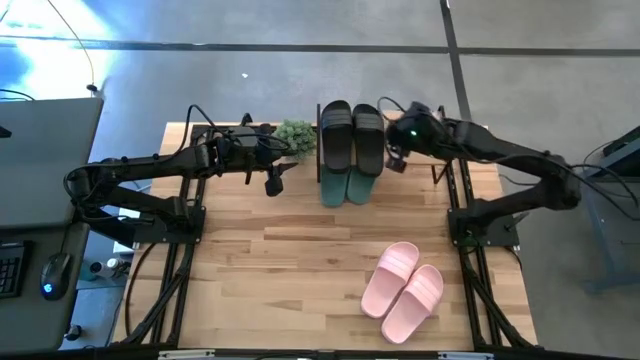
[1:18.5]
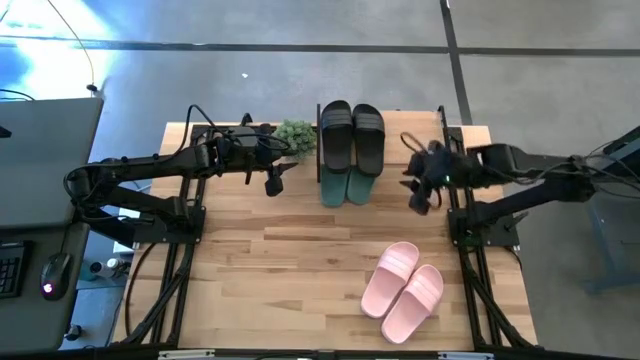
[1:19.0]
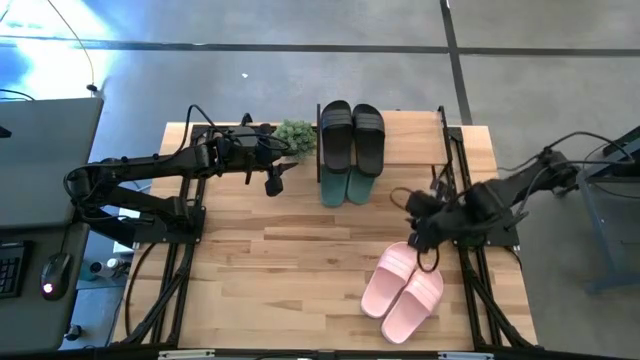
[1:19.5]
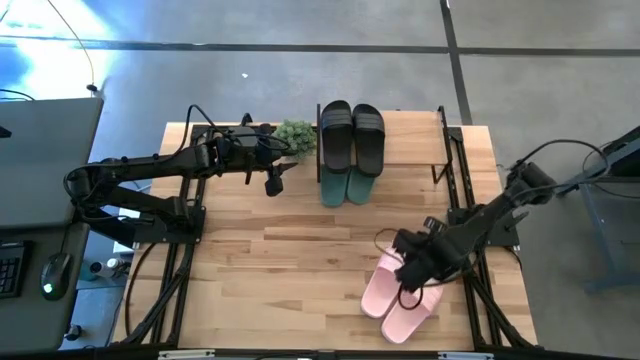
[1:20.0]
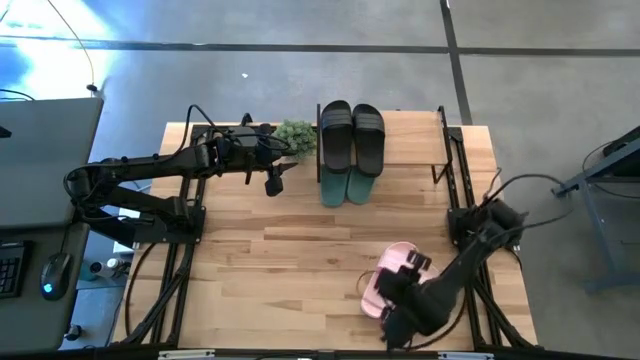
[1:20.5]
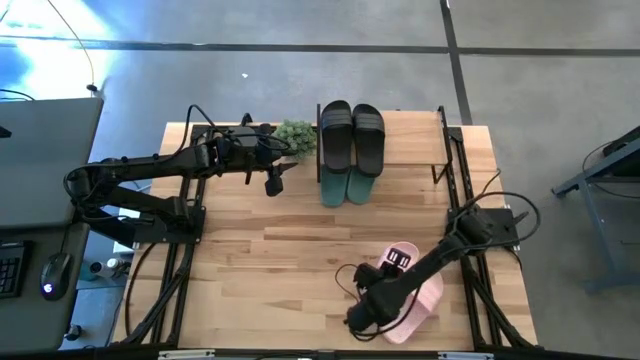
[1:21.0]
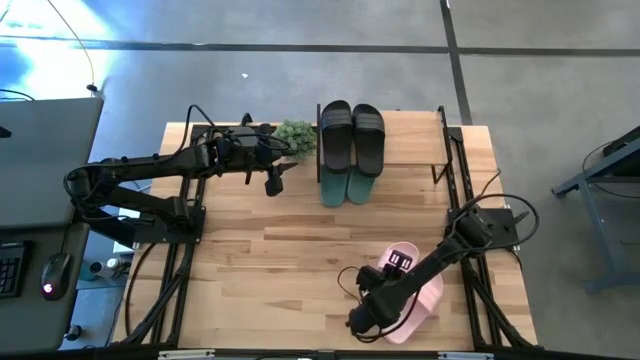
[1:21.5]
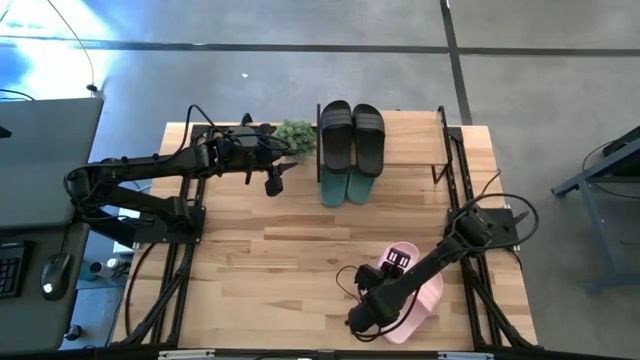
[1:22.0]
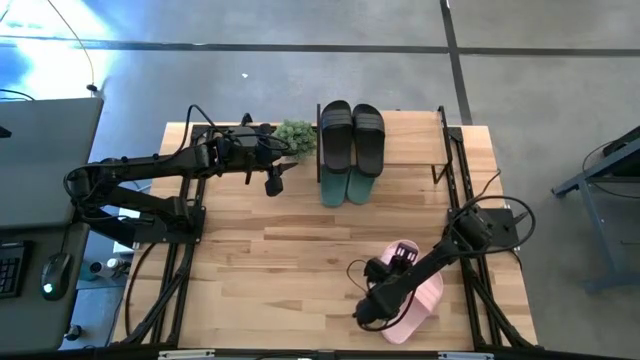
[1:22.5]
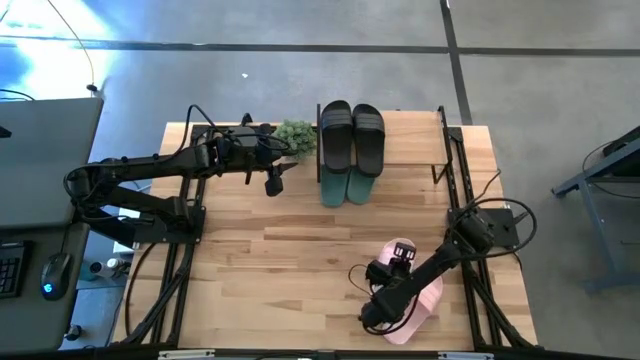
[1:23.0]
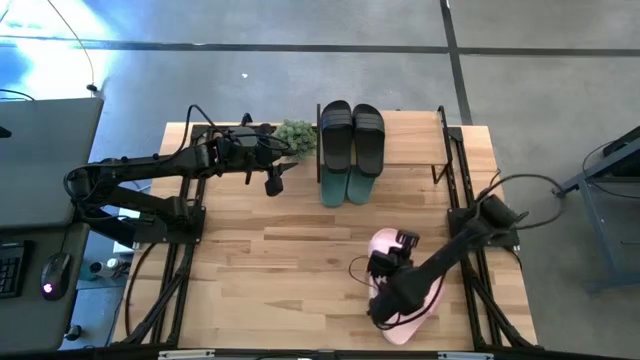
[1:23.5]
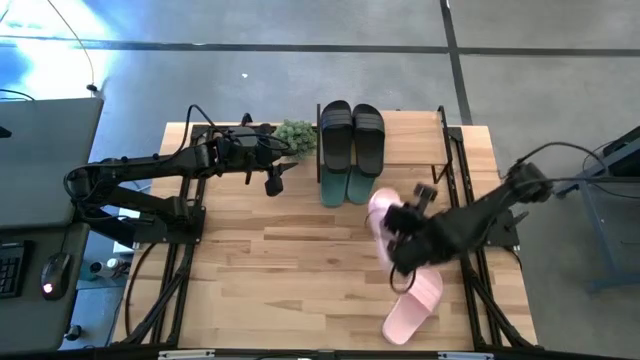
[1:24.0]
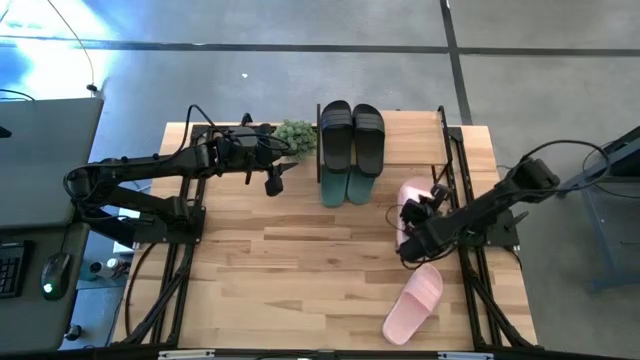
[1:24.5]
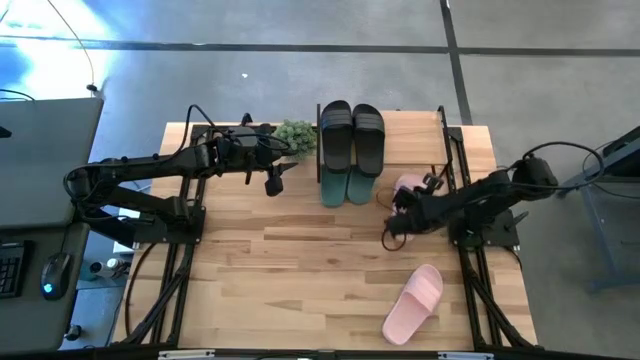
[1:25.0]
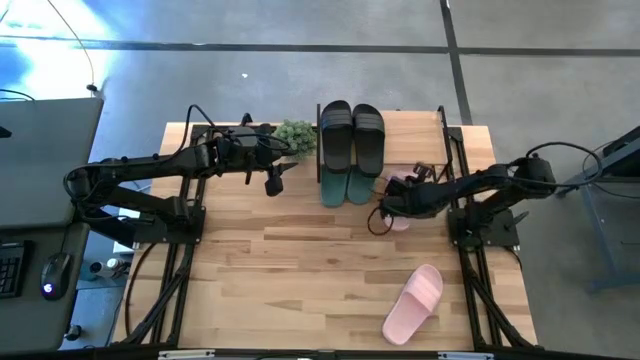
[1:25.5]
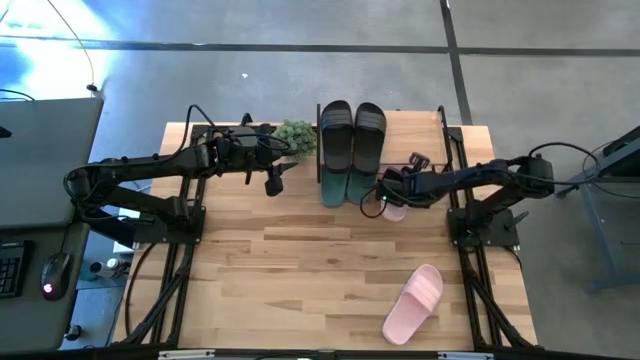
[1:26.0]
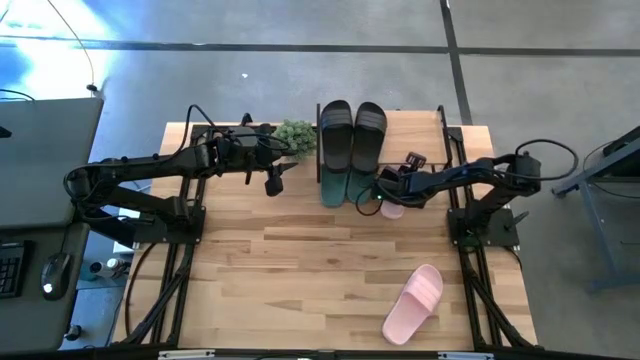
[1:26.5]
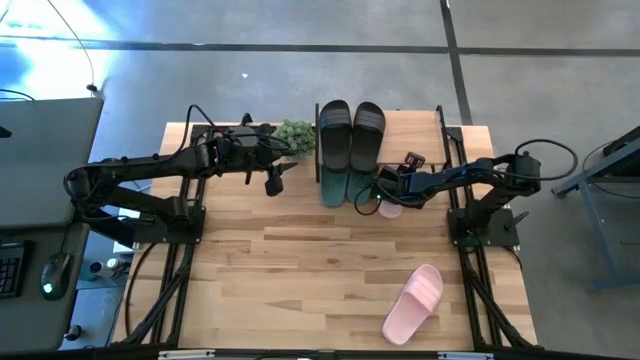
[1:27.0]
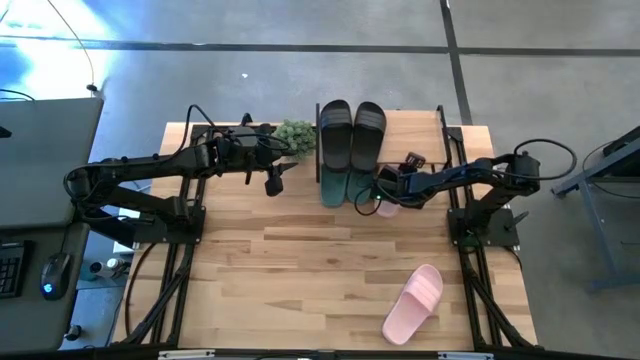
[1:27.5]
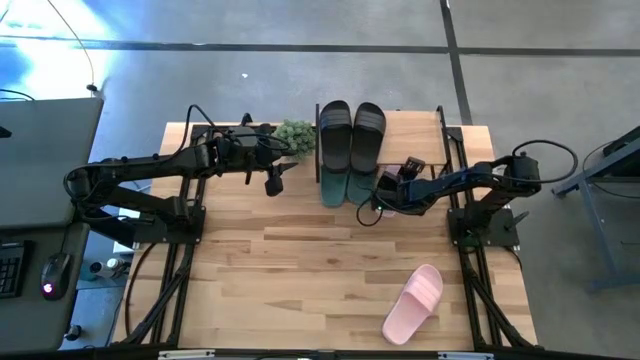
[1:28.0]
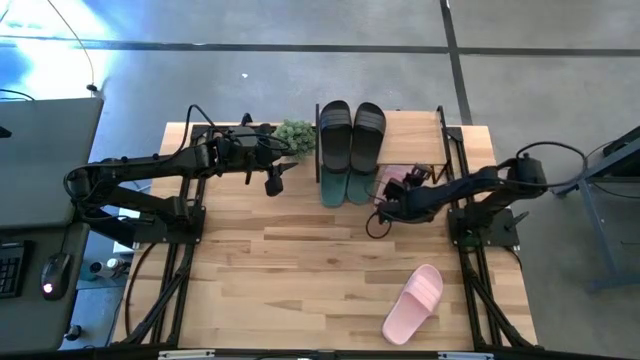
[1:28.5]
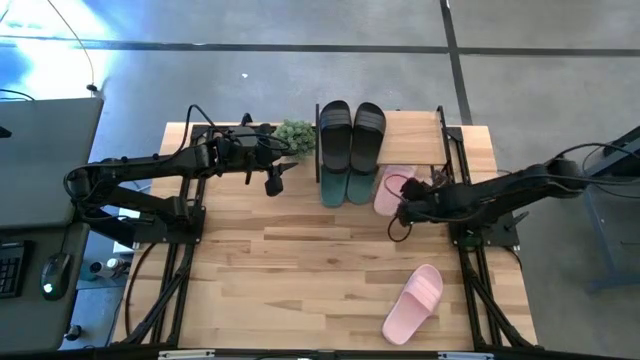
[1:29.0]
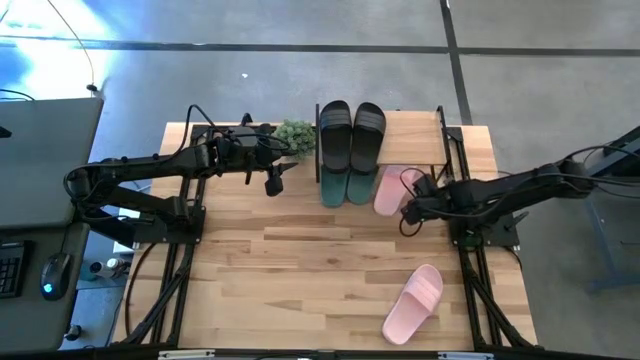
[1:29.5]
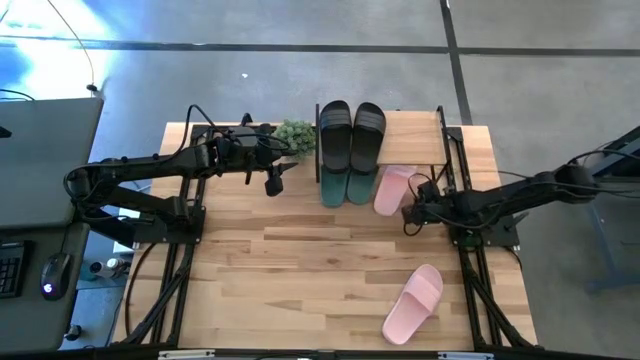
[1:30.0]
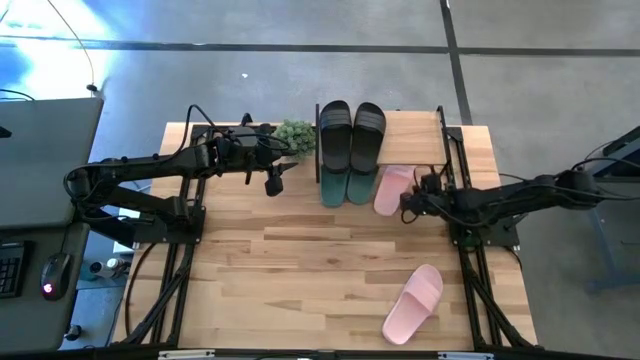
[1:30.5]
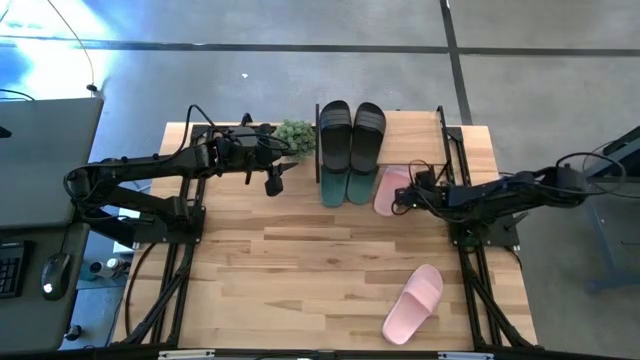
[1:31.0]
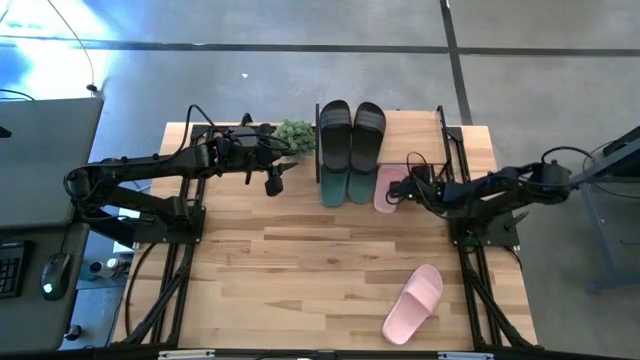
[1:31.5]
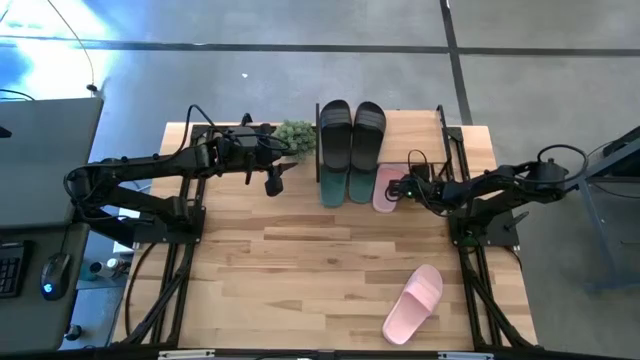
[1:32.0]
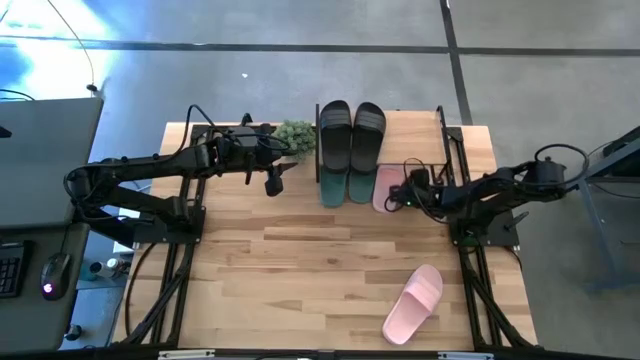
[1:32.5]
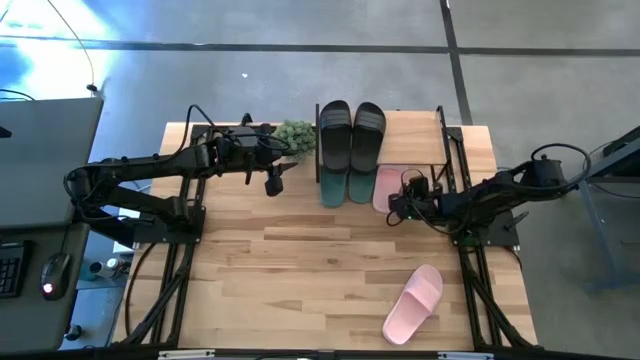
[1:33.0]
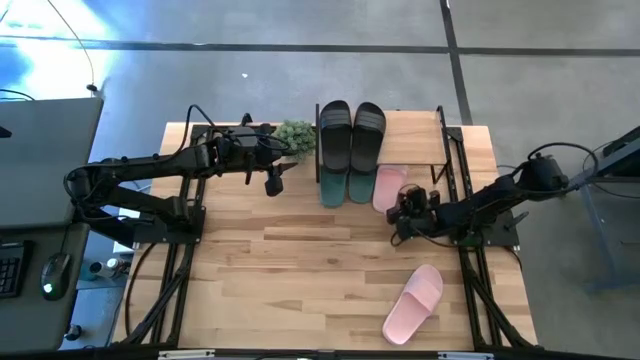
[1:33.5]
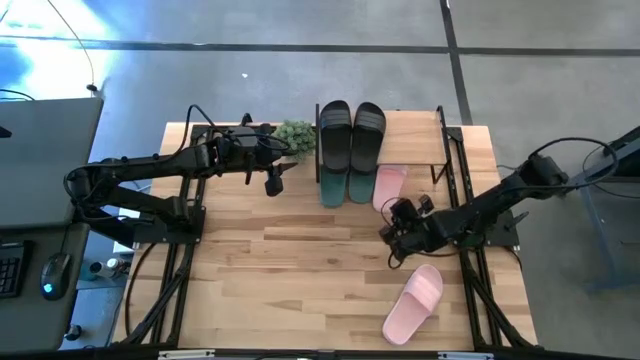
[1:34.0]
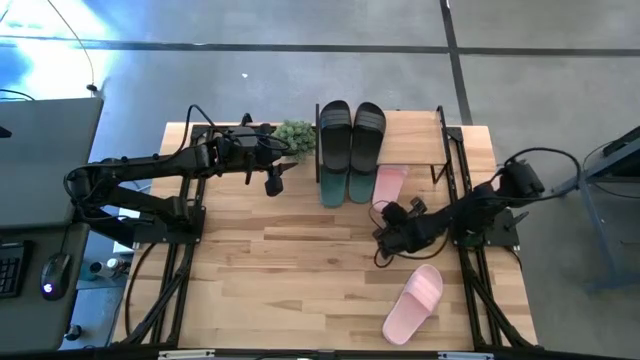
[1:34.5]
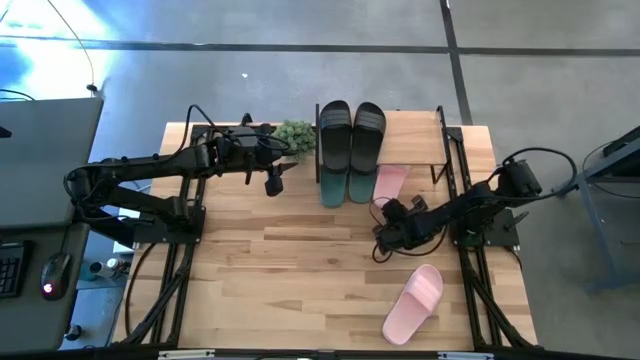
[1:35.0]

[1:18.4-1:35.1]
Task: Pick and place slides into the shelf
Put the left pink slide under the shelf

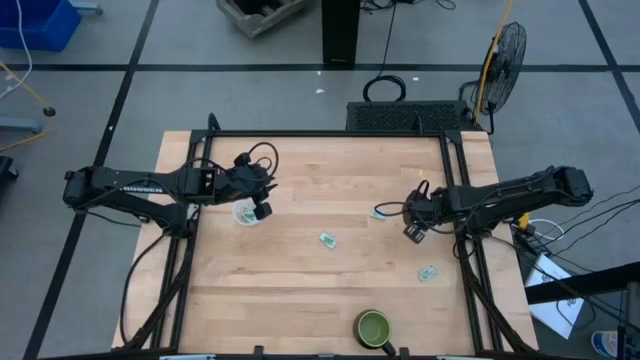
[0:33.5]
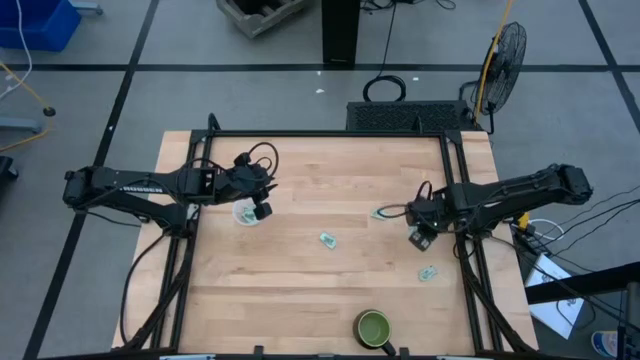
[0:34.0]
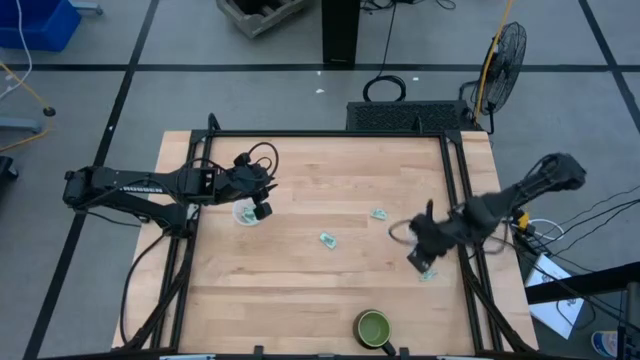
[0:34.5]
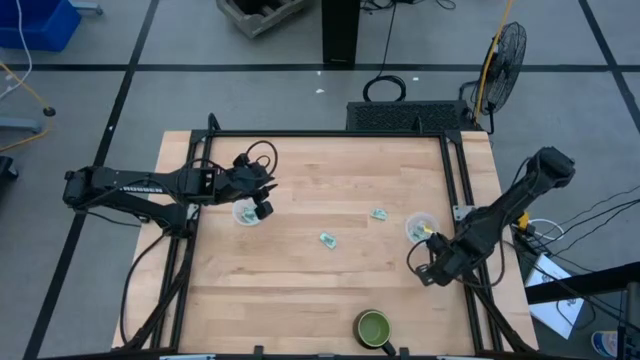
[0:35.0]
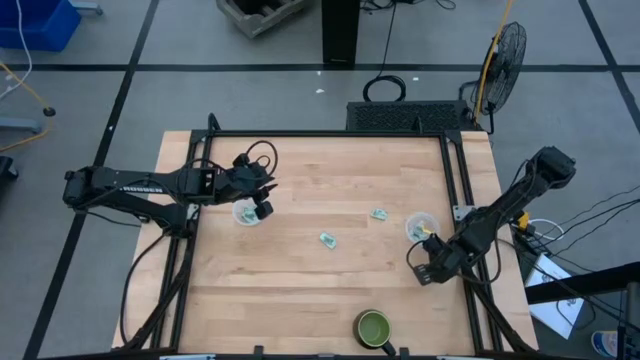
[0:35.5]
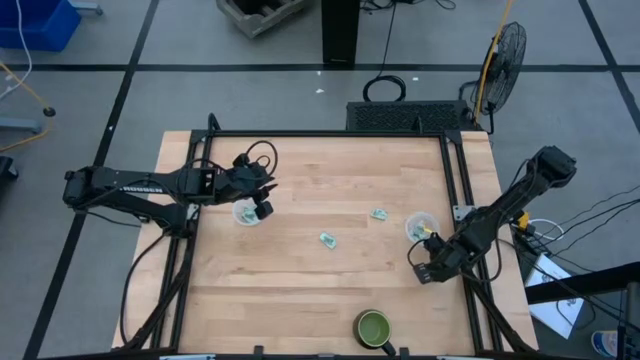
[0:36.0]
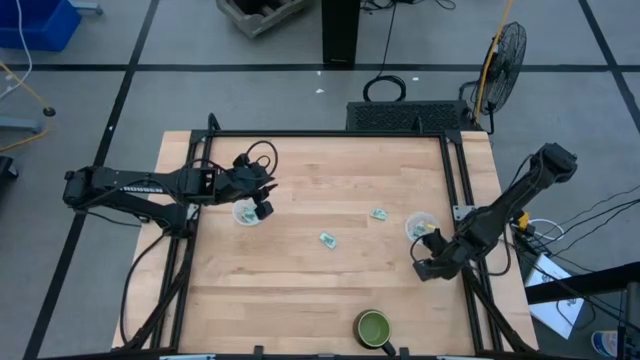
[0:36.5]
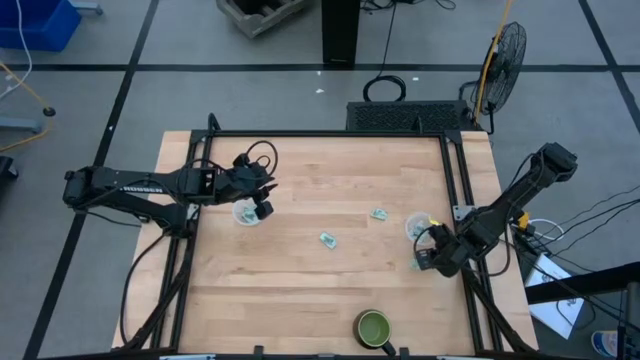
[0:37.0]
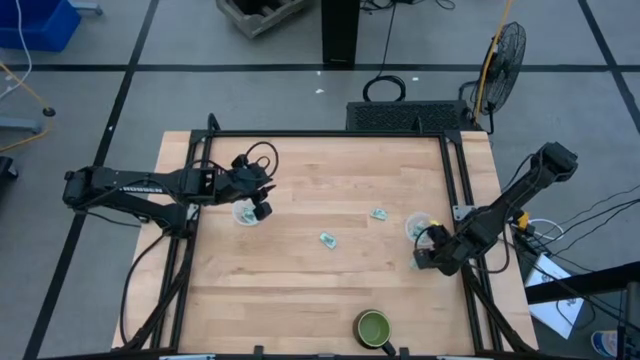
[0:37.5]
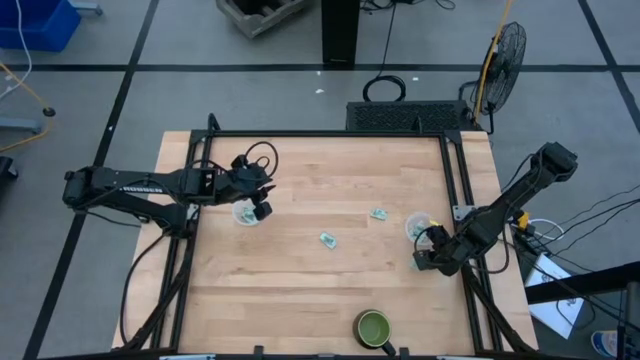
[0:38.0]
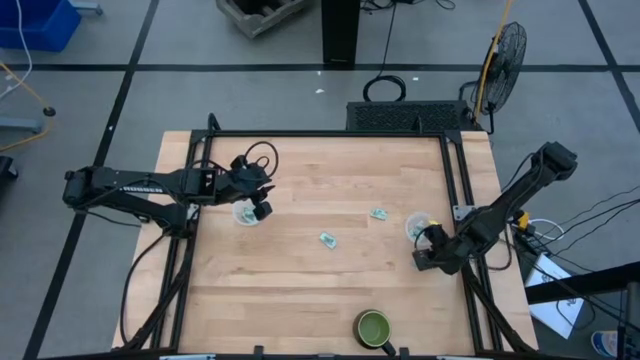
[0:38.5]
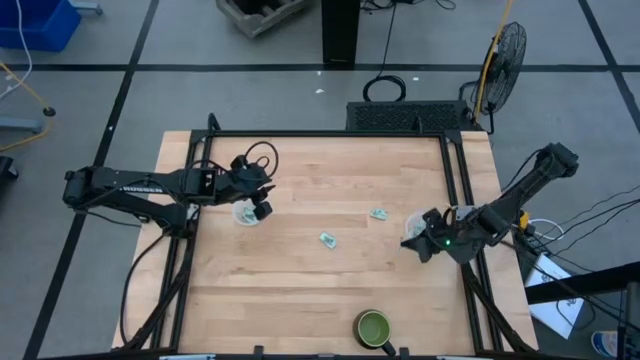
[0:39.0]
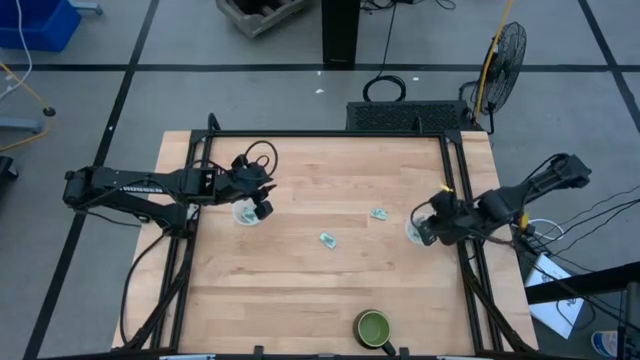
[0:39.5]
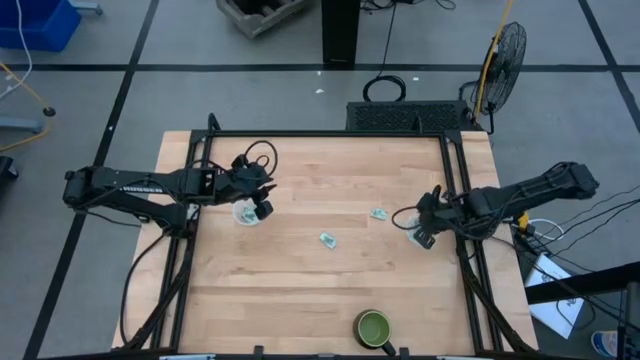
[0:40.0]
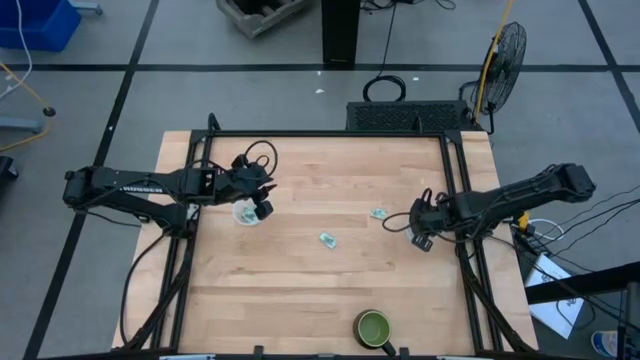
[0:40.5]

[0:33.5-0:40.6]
Task: Pick and place Stevia / Truvia into bins
Put the stevia packet into the right transparent container
